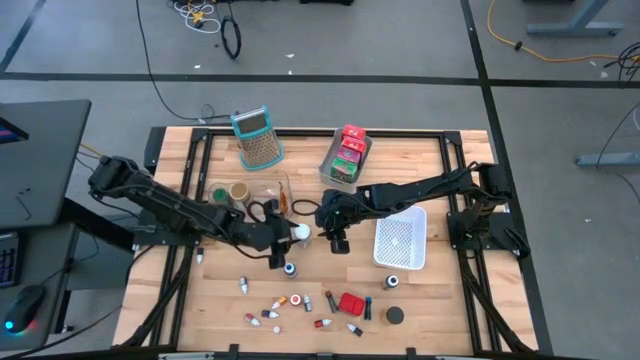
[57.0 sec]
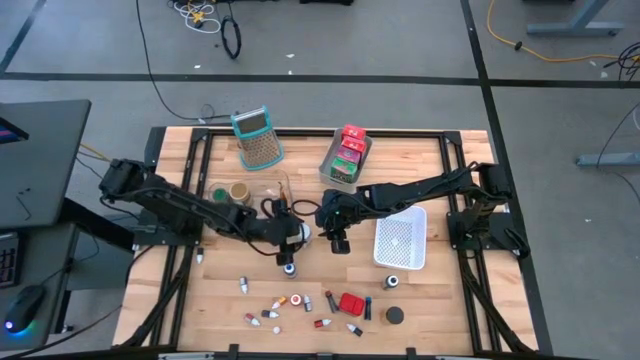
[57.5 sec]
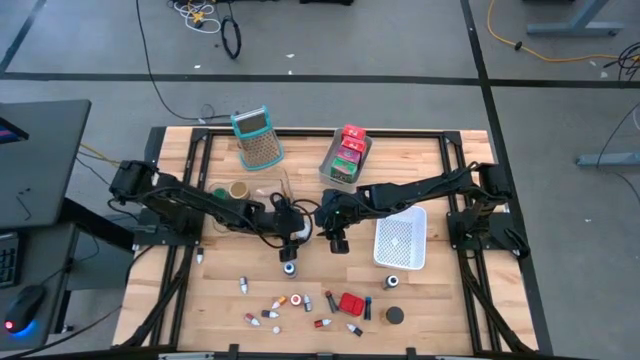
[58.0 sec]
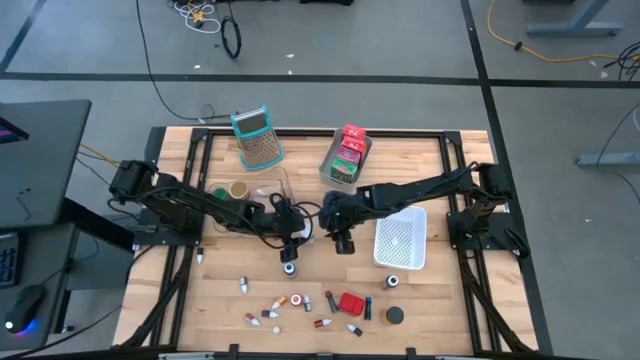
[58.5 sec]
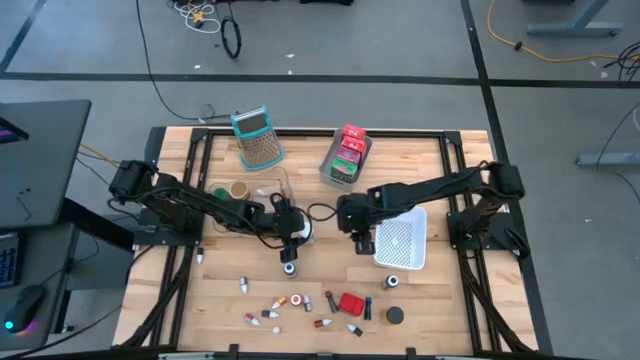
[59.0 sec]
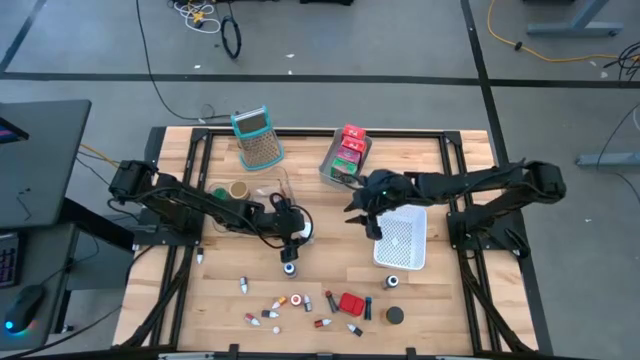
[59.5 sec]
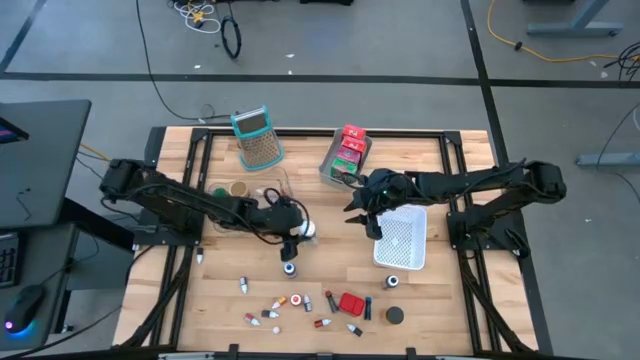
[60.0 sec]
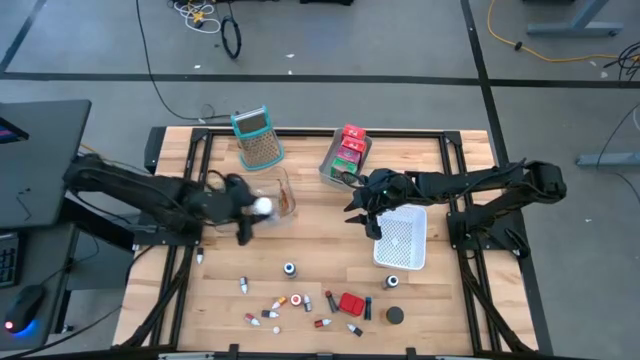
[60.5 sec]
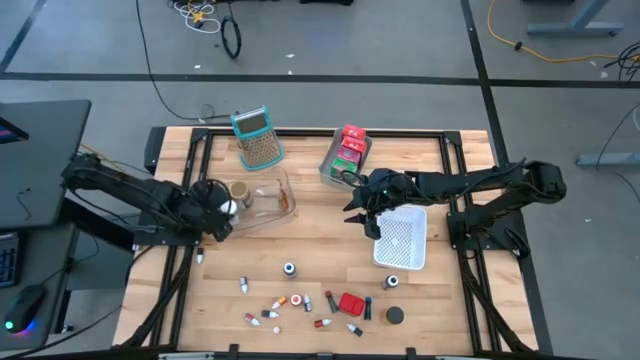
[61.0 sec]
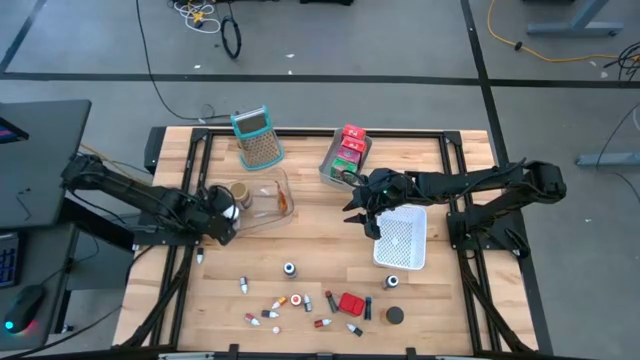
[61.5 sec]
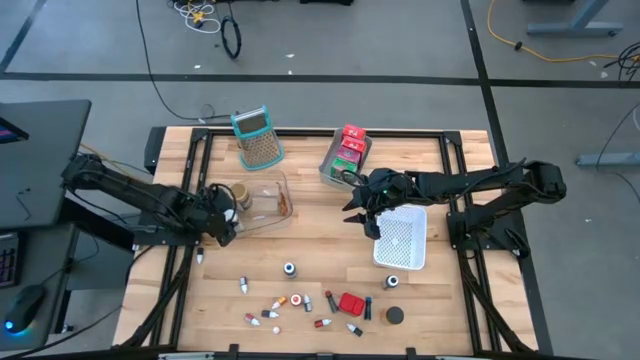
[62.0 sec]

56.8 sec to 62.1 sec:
Task: Pick & Place Kitchen Items
Put the white seasoning bottle into the transparent bin

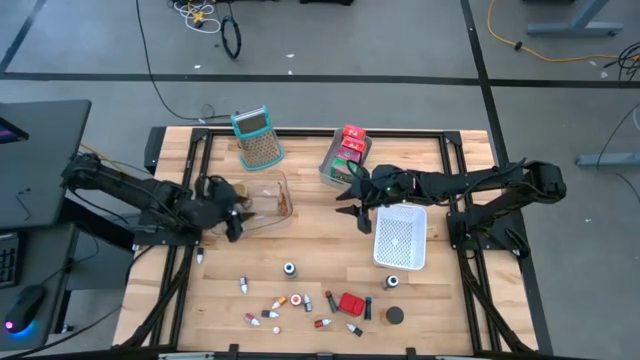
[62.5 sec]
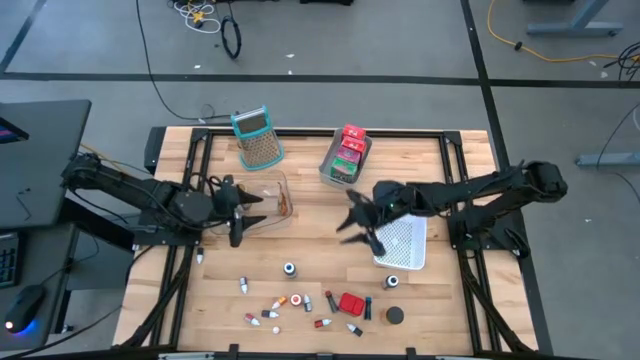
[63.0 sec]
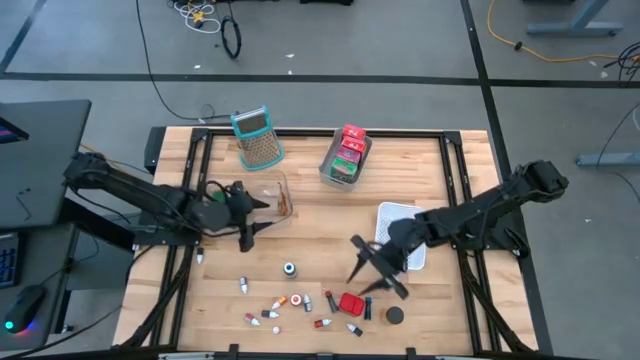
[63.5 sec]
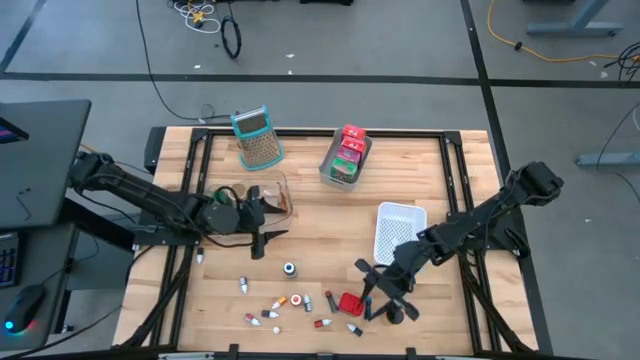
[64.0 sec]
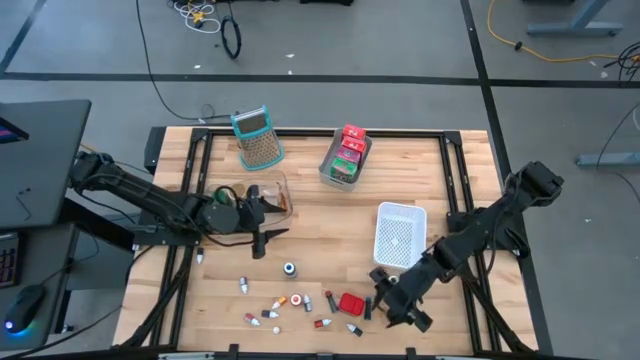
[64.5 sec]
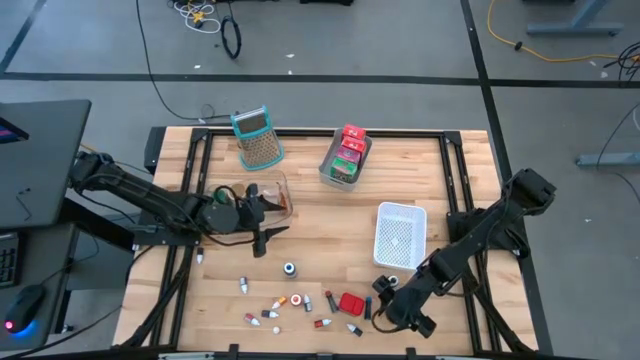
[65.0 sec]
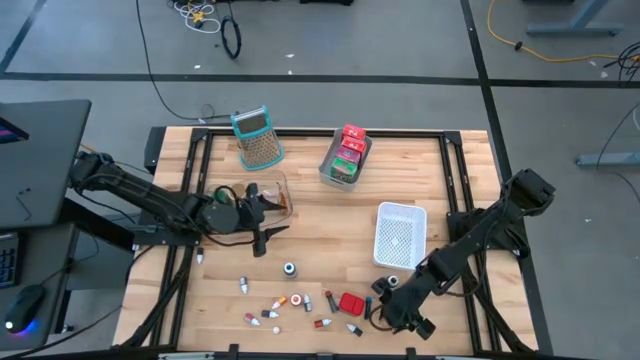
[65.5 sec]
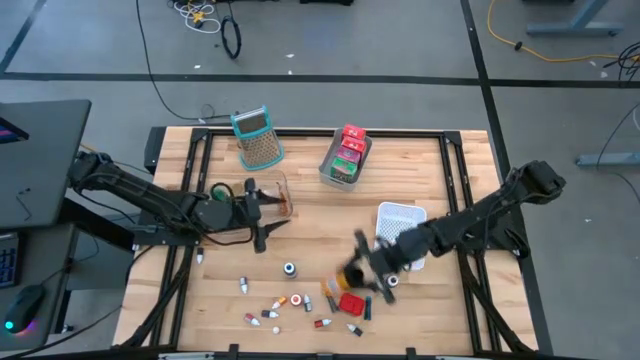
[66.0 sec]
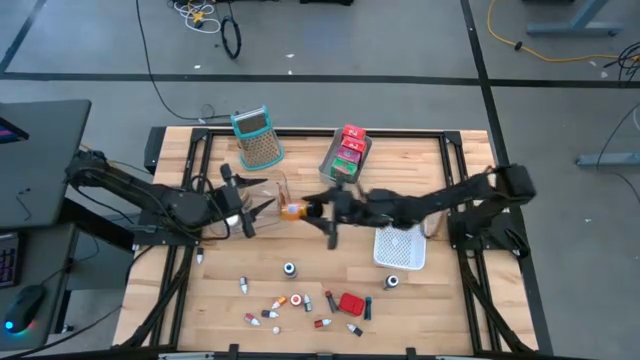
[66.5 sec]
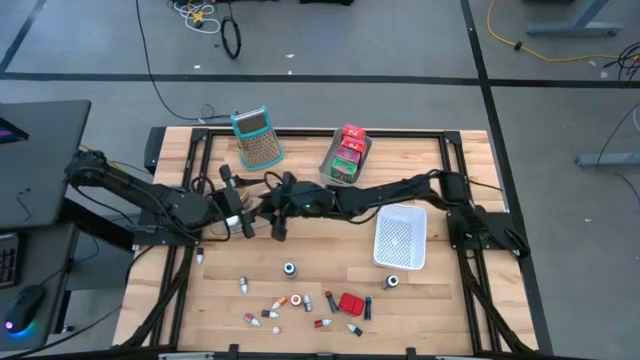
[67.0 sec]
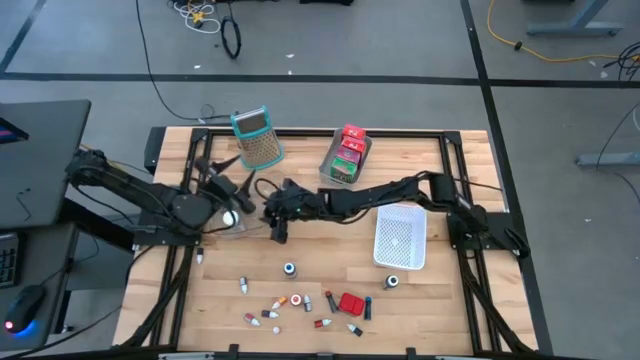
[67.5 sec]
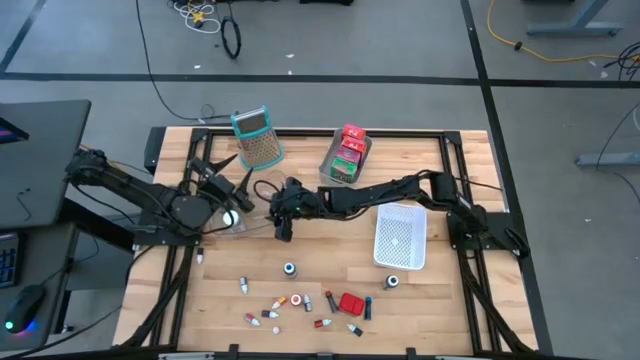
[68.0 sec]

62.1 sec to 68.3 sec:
Put the black seasoning bottle into the transparent bin

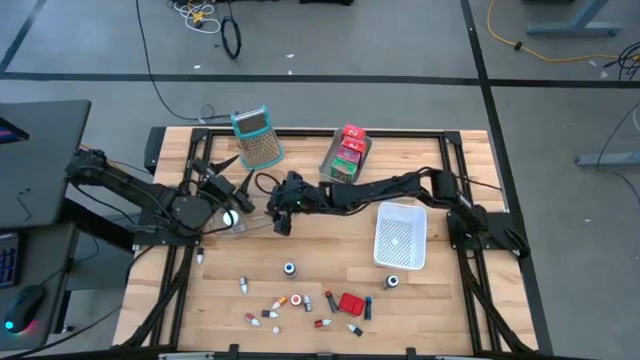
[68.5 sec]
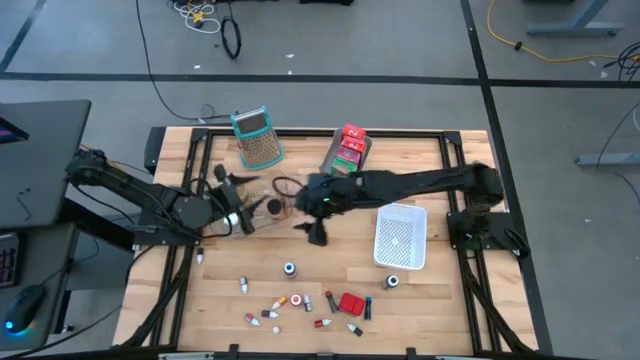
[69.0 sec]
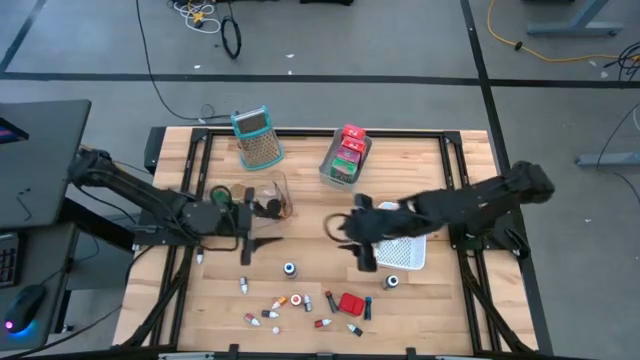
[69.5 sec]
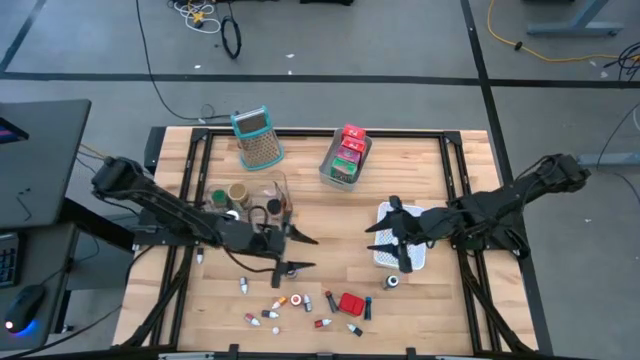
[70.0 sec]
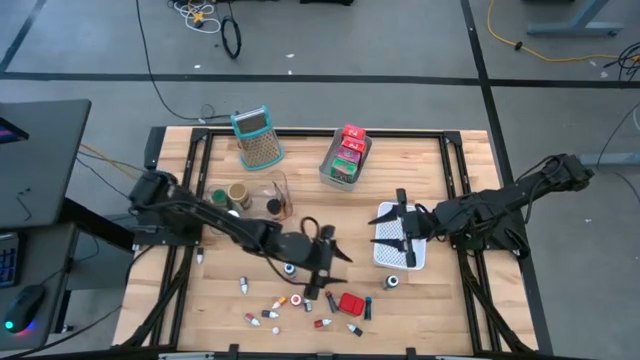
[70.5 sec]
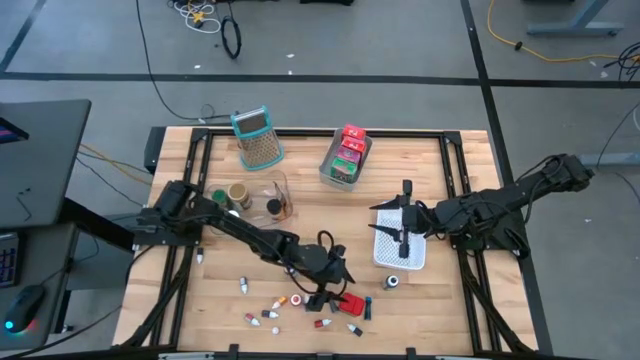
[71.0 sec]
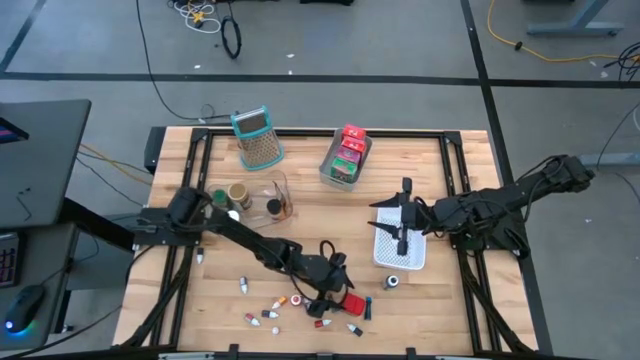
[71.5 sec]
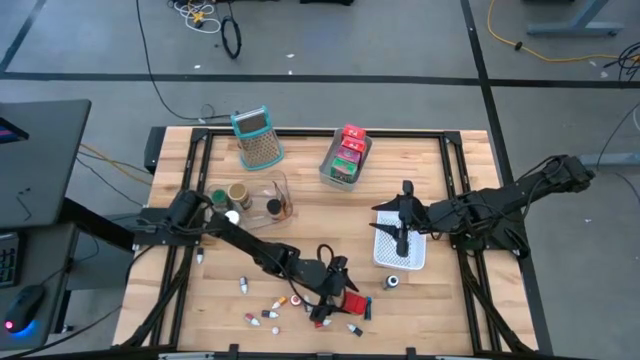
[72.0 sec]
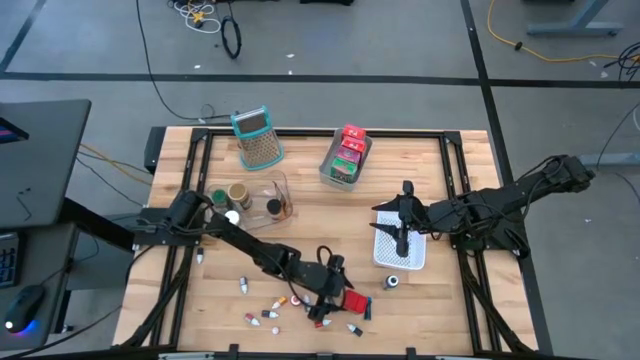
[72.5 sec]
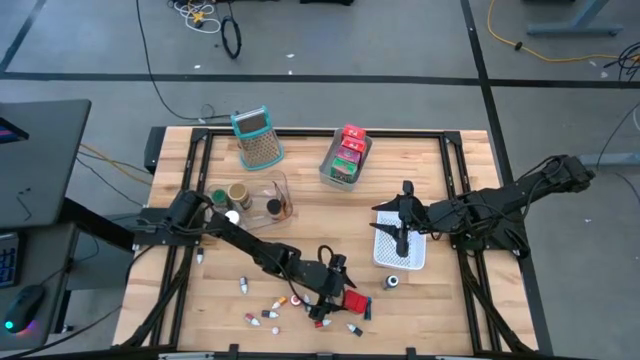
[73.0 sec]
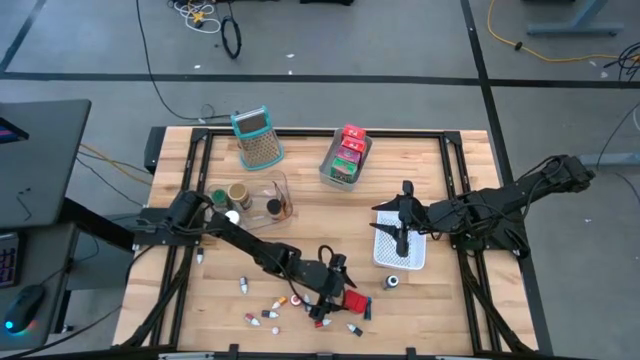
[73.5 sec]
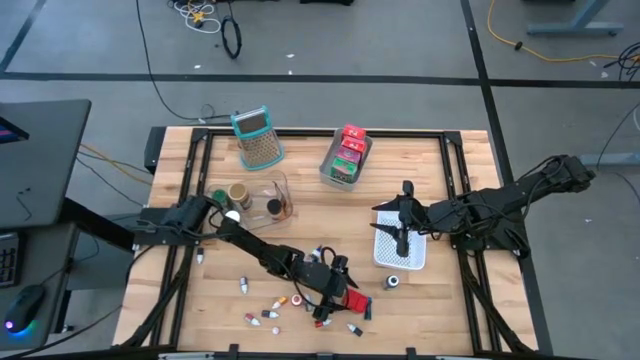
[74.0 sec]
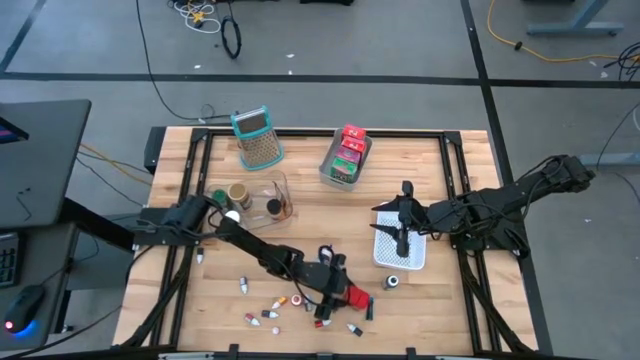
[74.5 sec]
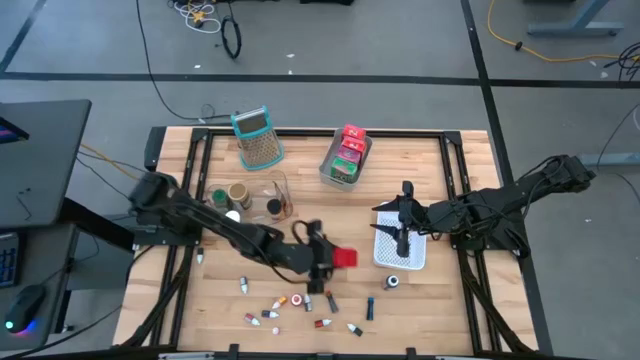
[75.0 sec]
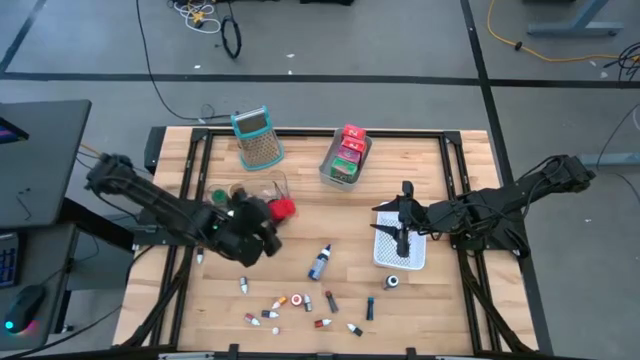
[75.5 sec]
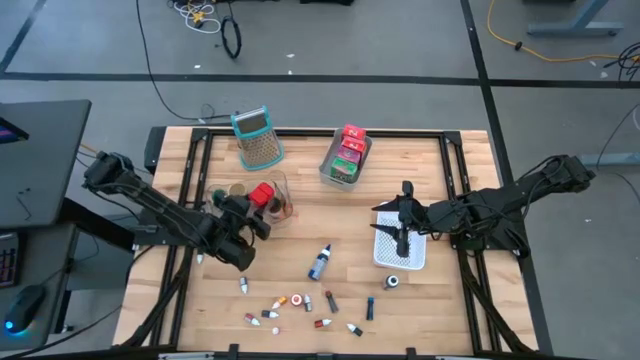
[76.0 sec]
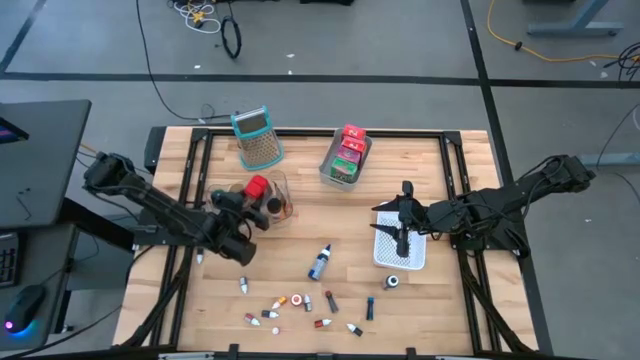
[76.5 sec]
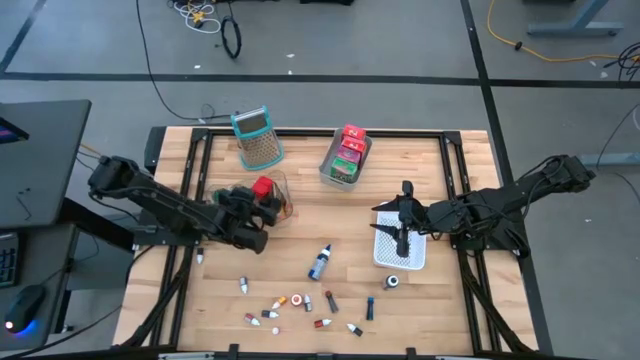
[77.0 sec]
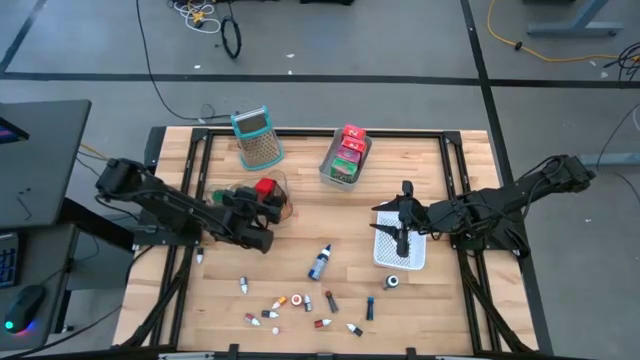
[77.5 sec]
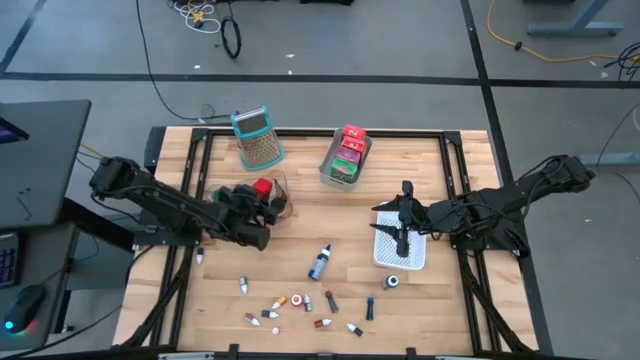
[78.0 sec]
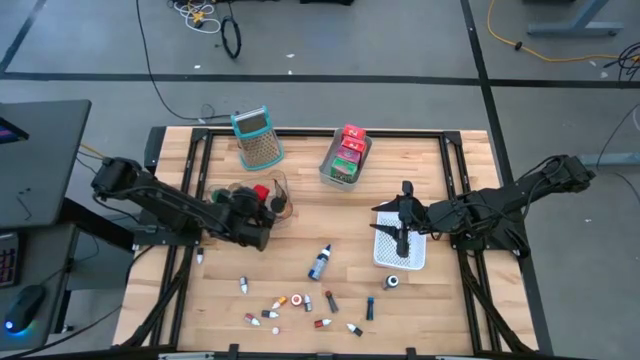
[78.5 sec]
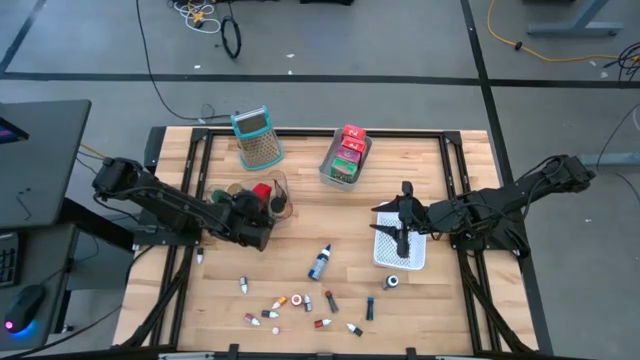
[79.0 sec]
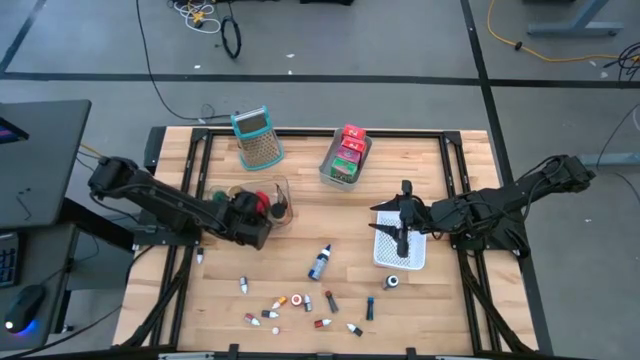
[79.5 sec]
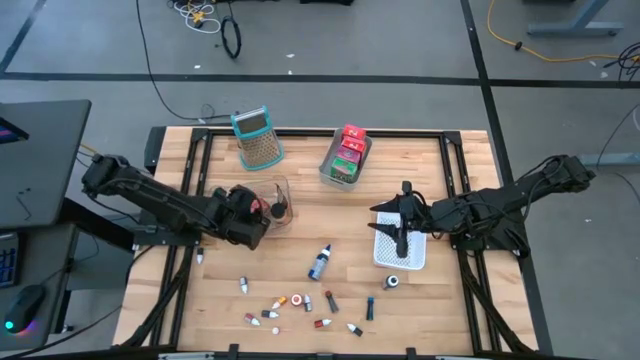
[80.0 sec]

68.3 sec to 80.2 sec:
Put the red seasoning can into the transparent bin
